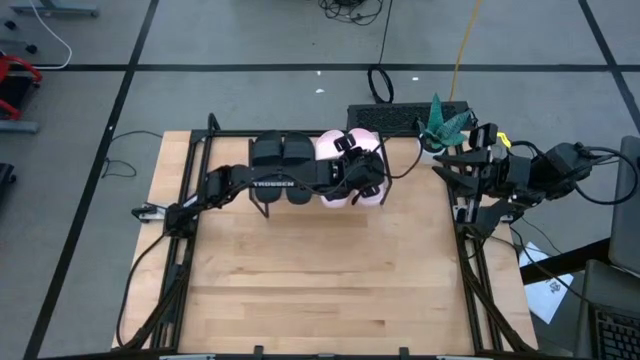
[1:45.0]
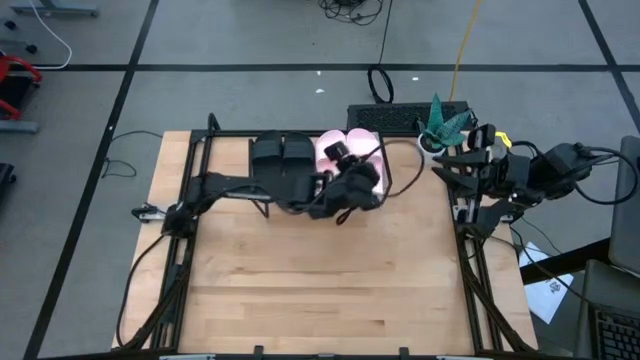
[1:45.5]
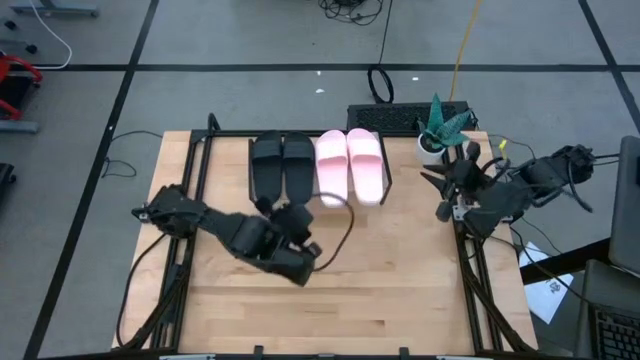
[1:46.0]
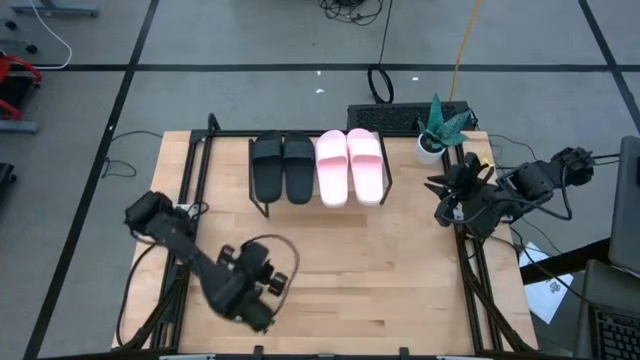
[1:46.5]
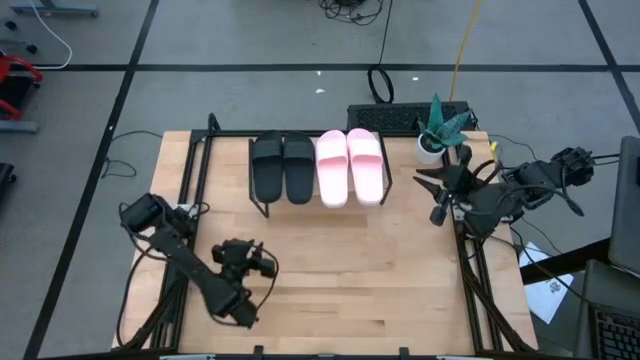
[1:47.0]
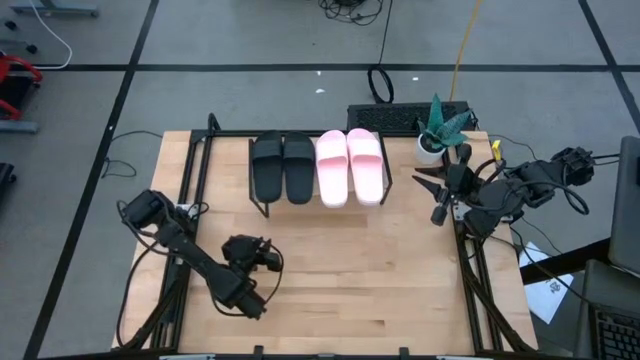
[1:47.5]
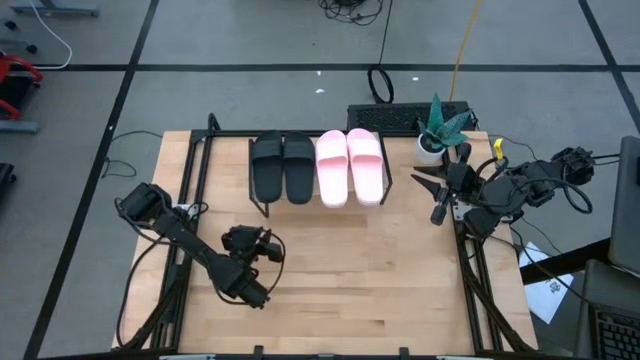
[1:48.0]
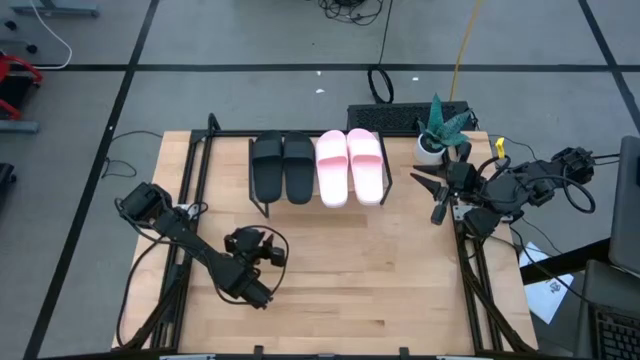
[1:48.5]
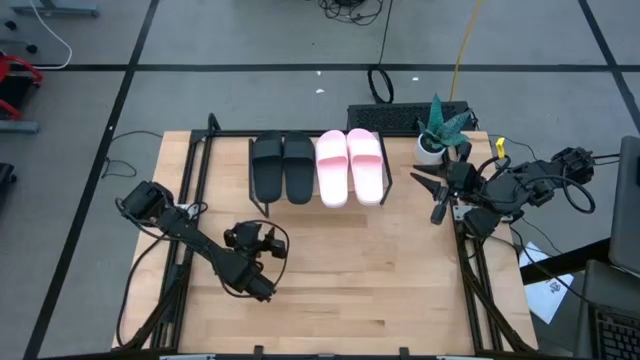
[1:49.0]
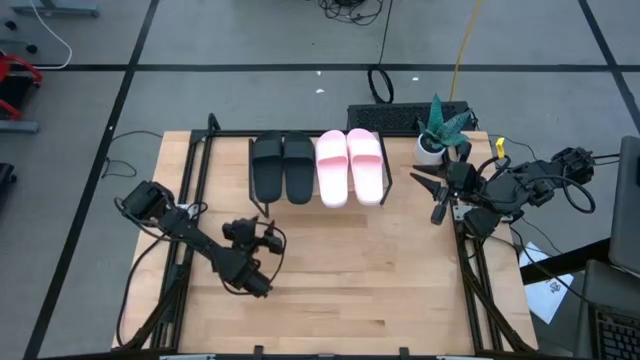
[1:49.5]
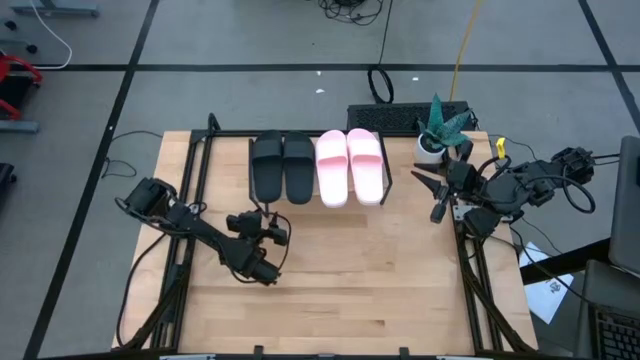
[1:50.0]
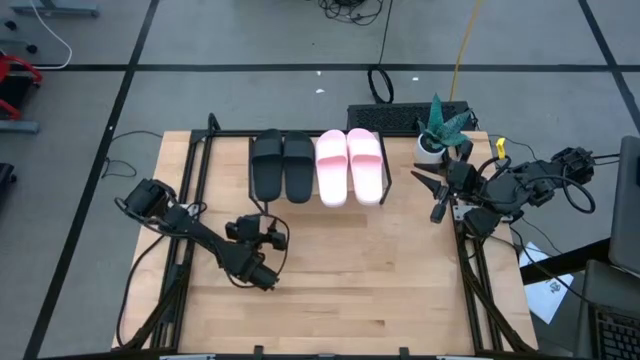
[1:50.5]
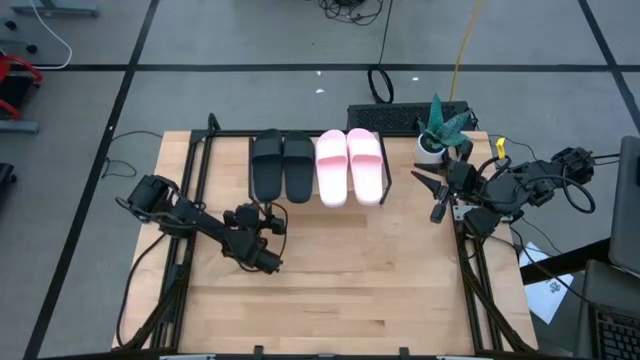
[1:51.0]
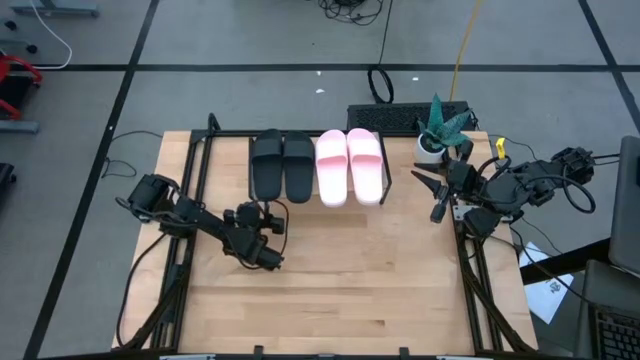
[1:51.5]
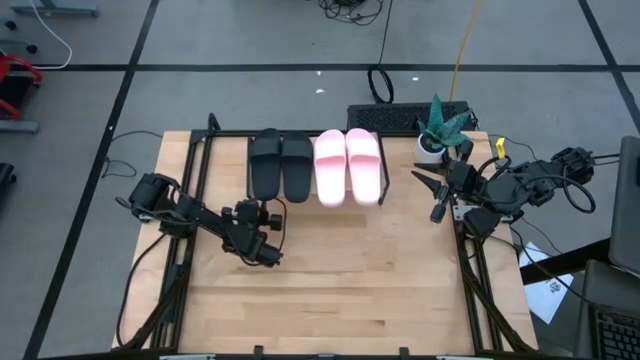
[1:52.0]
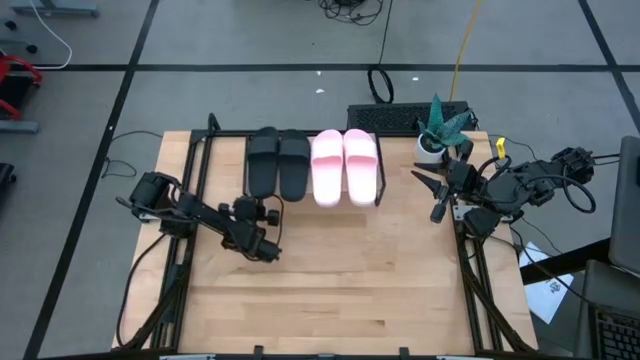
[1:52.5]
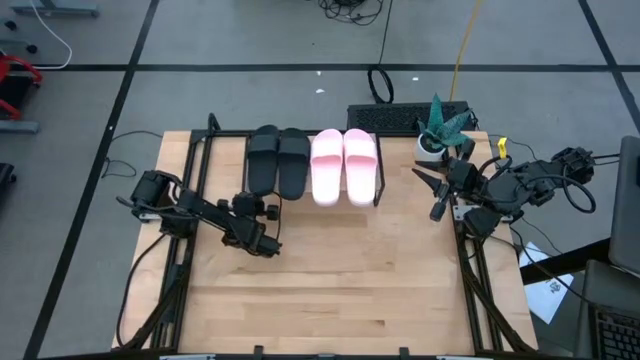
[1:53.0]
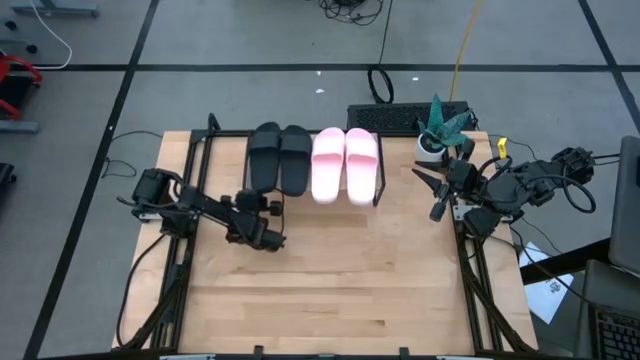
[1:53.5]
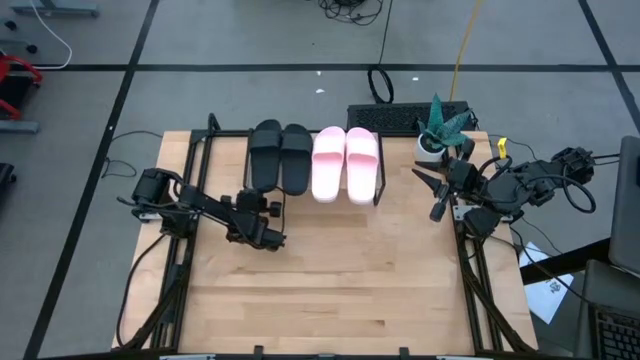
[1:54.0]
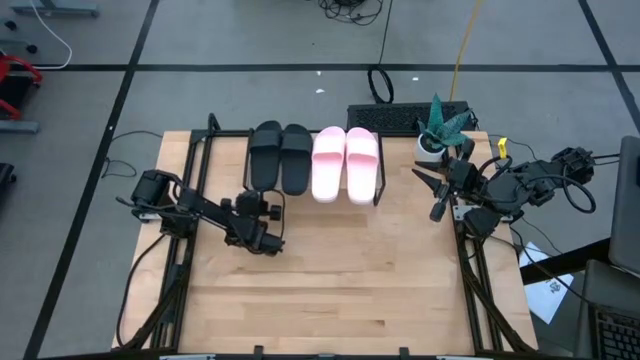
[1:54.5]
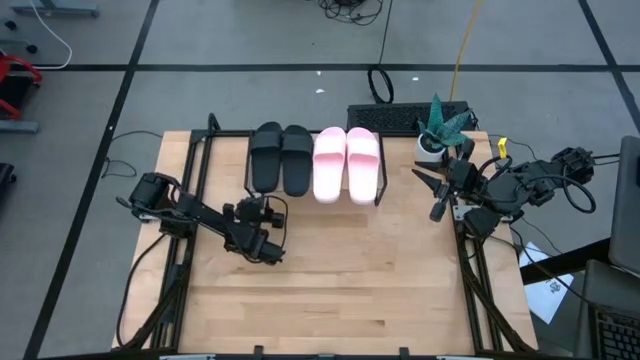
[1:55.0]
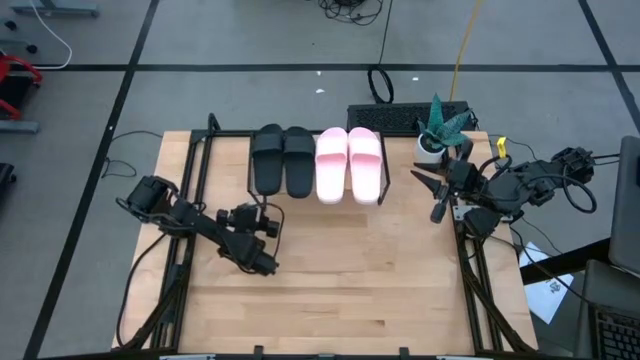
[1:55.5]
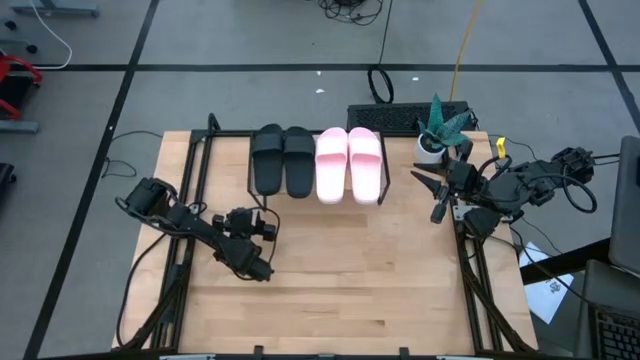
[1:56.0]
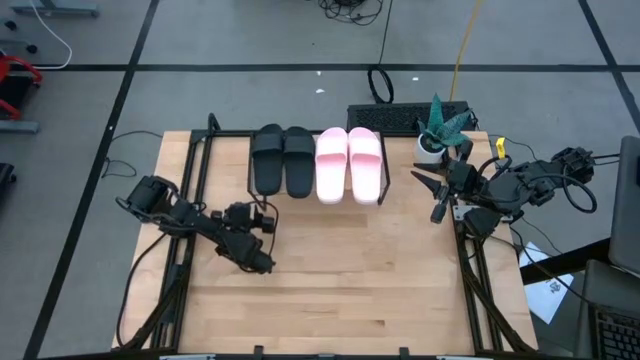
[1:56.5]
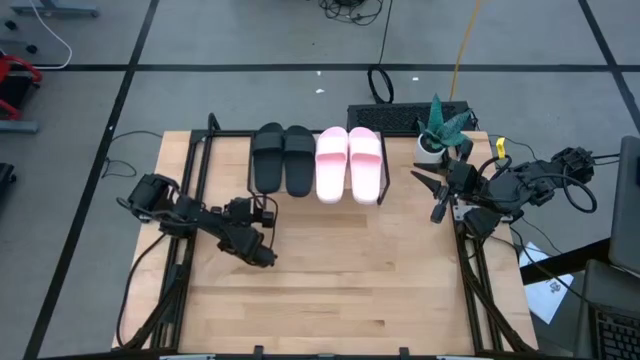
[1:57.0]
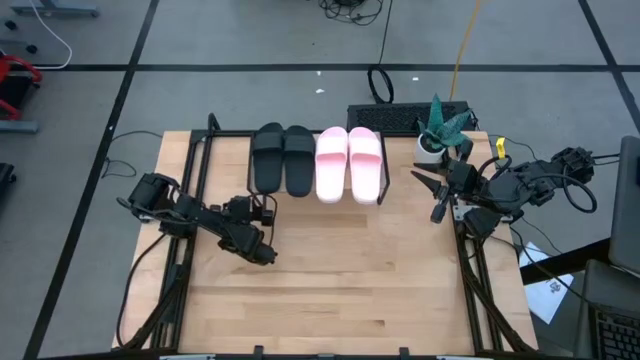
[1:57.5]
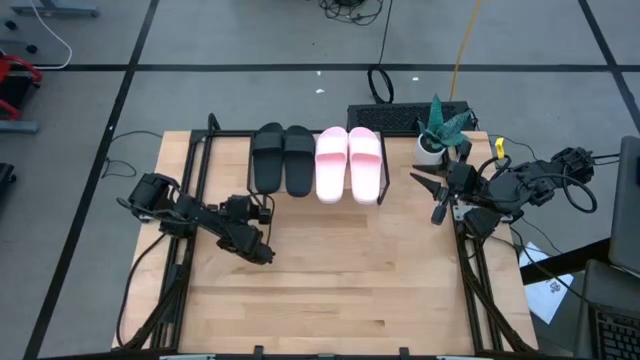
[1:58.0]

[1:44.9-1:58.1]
Task: Pick and place slides into the shelf
Adjust the shelf

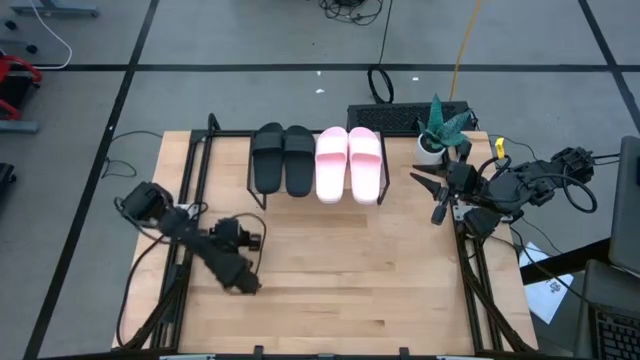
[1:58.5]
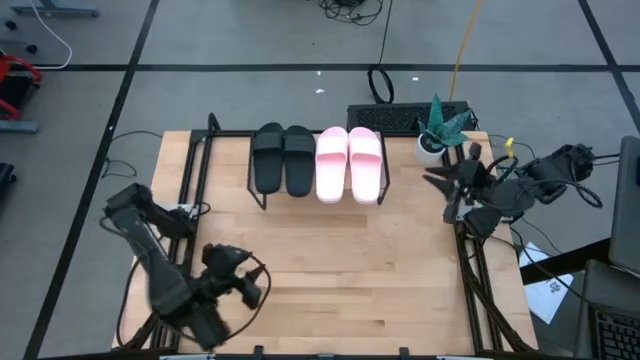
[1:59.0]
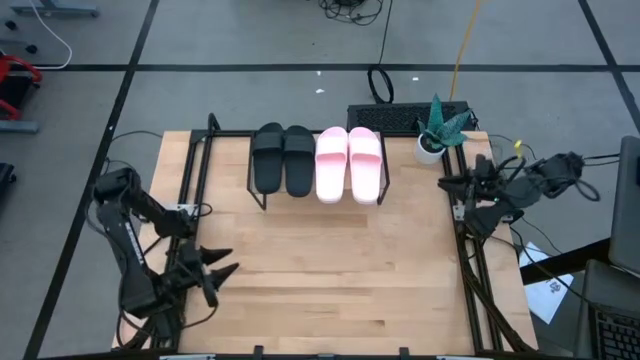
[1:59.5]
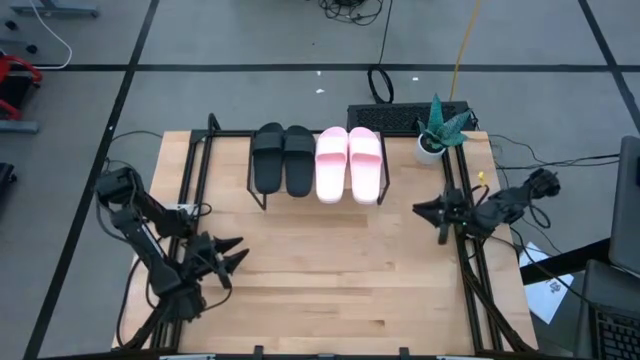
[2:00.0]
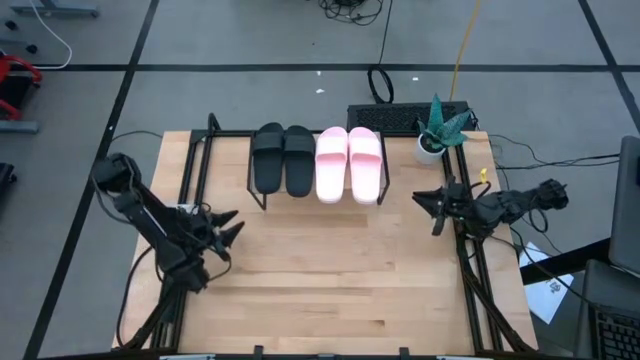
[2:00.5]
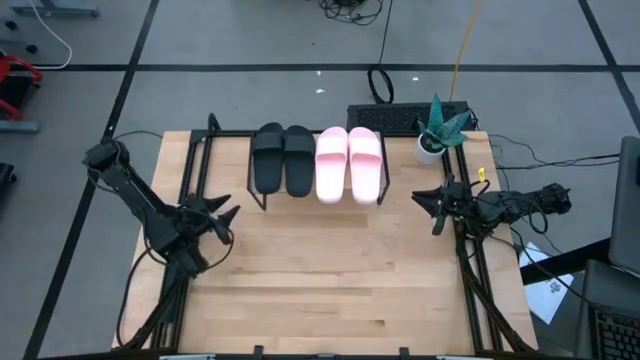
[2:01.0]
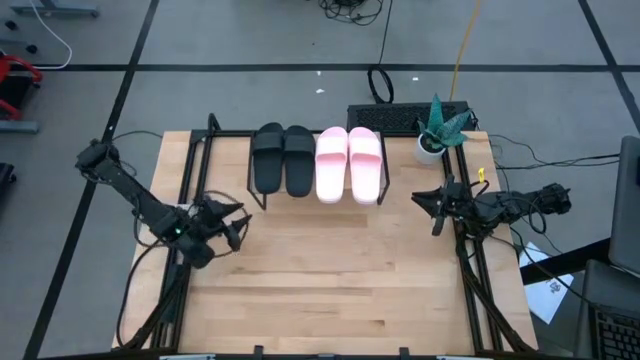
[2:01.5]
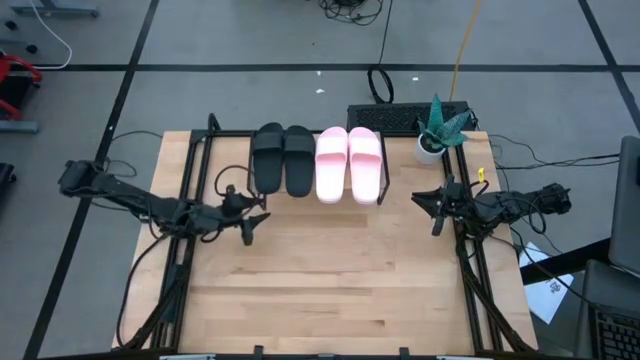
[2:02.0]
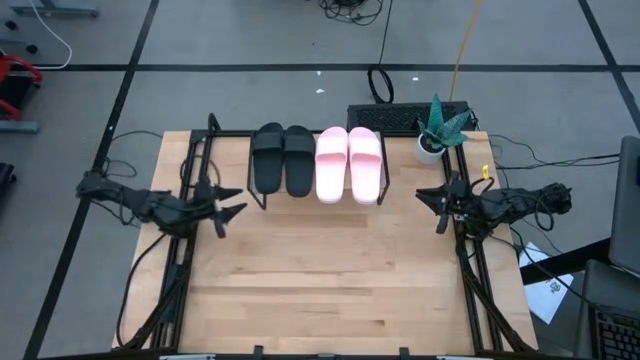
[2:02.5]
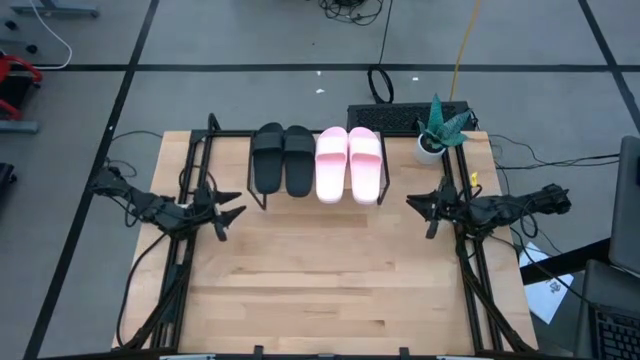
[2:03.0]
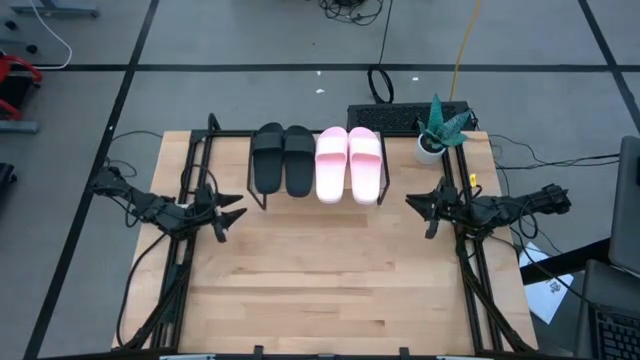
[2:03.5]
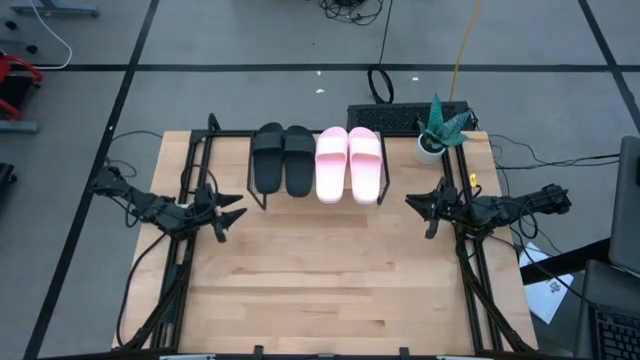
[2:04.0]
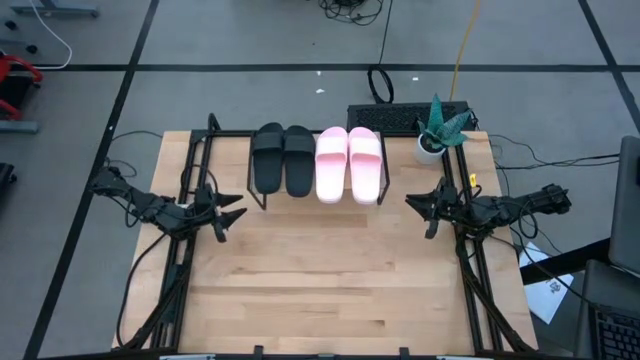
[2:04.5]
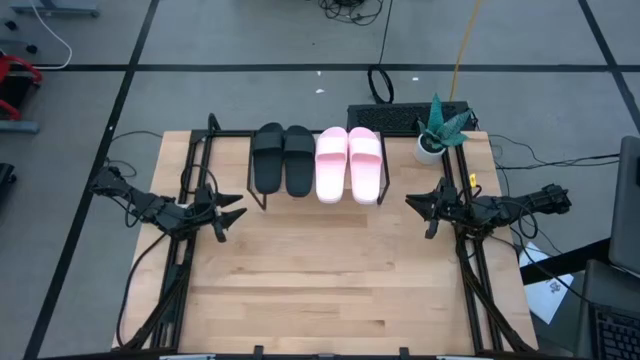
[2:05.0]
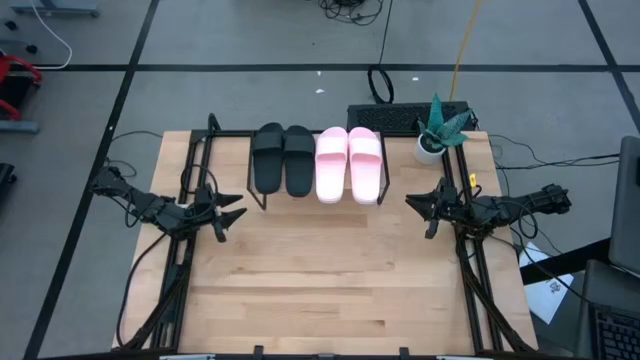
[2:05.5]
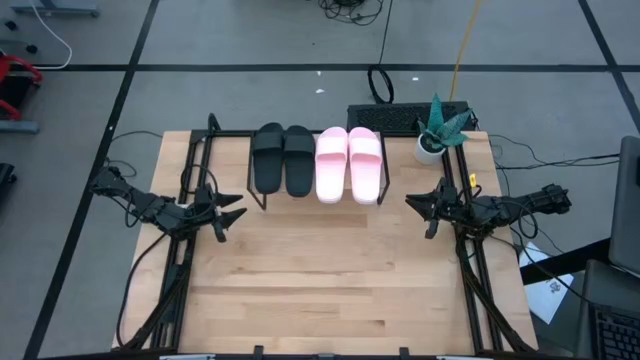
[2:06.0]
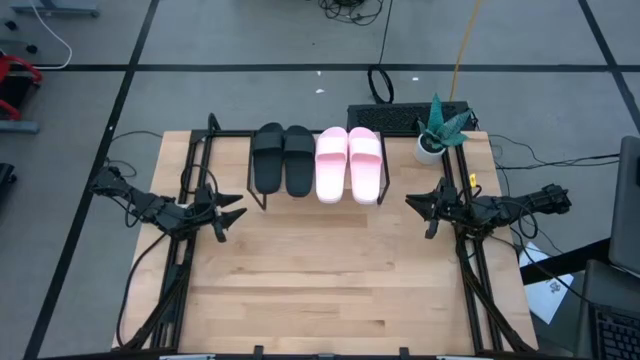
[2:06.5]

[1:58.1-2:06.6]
Return to Home Position
